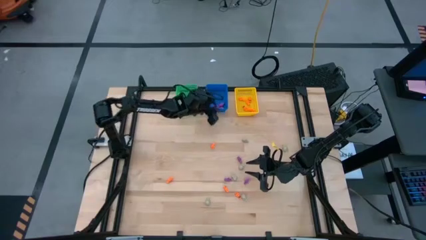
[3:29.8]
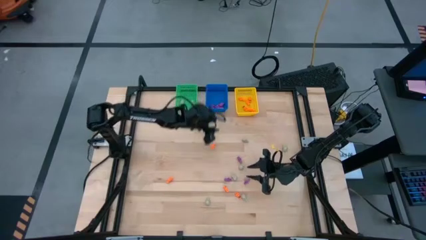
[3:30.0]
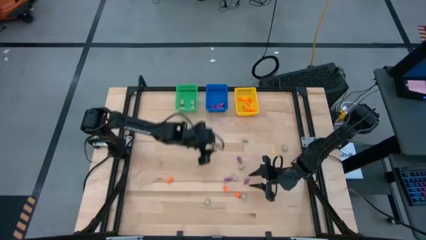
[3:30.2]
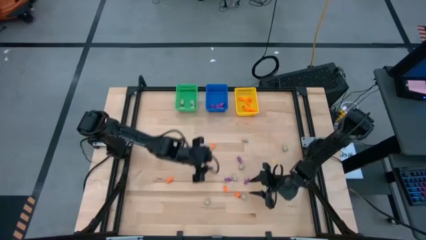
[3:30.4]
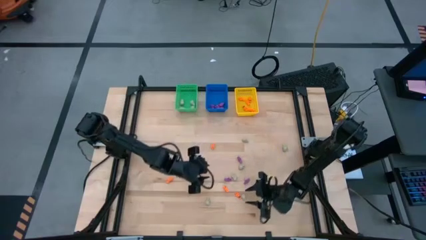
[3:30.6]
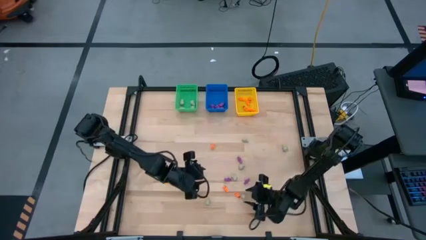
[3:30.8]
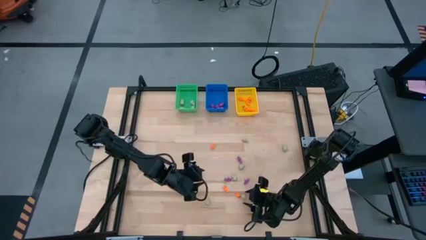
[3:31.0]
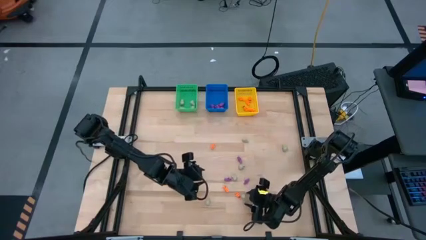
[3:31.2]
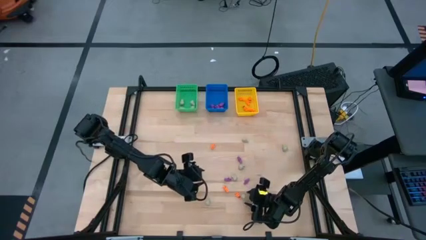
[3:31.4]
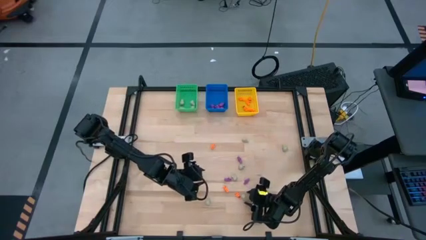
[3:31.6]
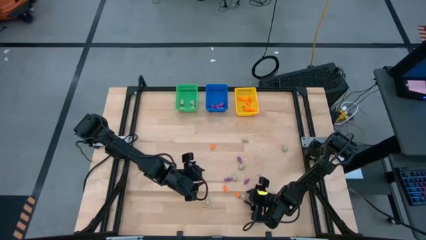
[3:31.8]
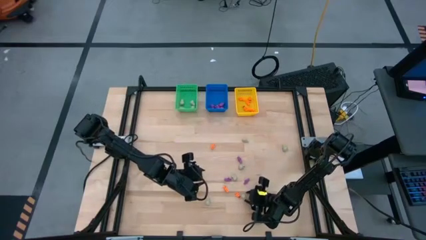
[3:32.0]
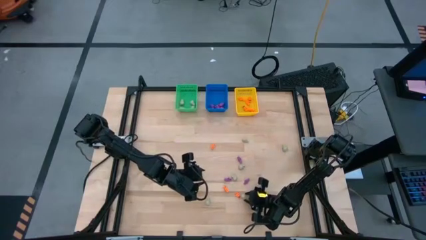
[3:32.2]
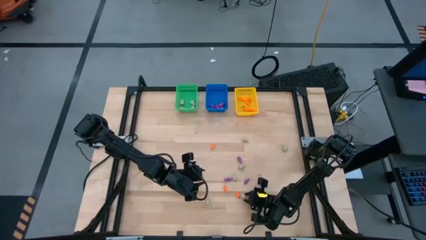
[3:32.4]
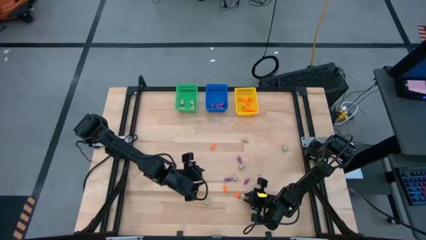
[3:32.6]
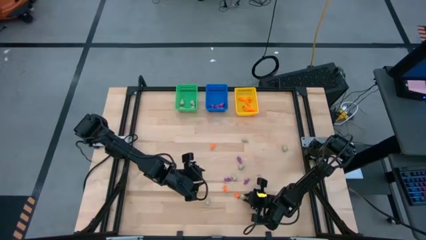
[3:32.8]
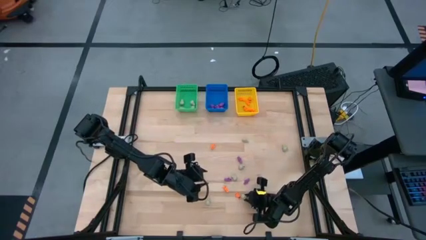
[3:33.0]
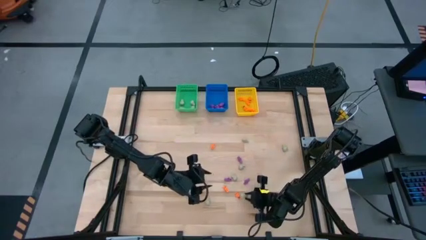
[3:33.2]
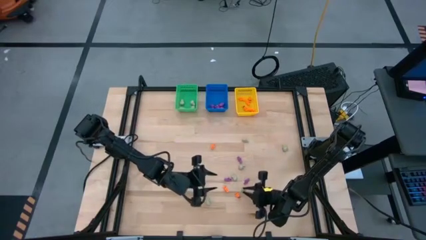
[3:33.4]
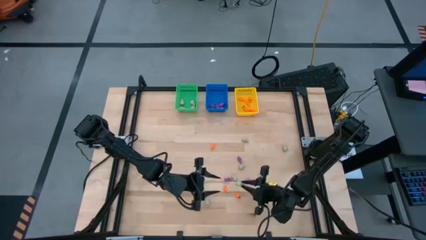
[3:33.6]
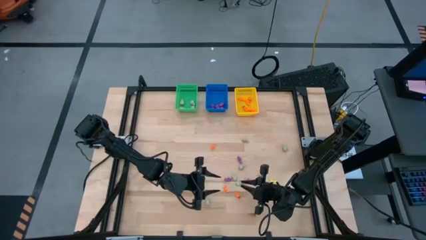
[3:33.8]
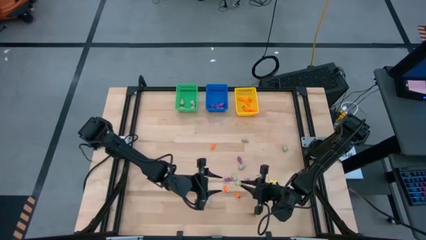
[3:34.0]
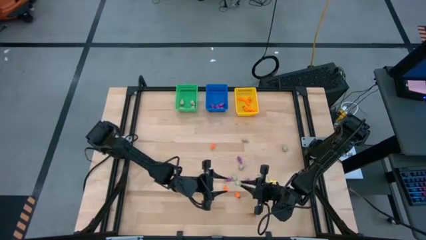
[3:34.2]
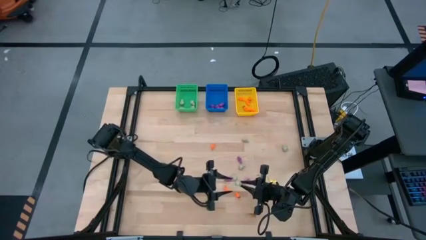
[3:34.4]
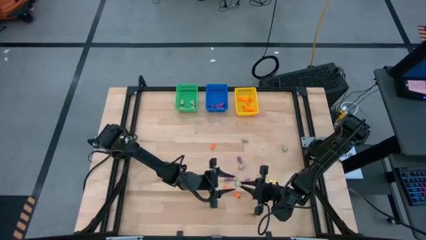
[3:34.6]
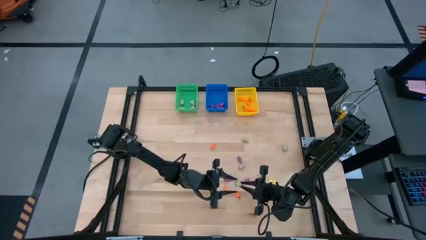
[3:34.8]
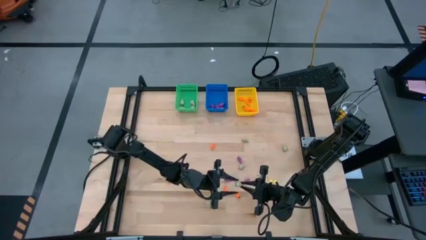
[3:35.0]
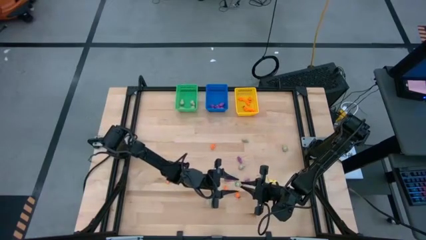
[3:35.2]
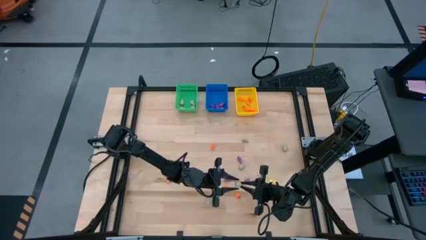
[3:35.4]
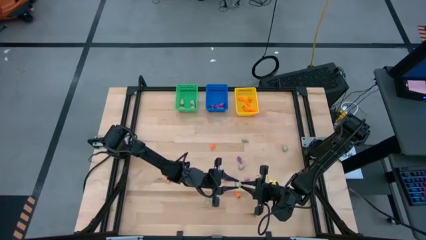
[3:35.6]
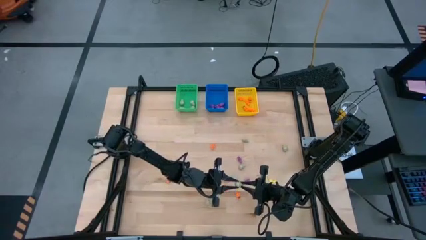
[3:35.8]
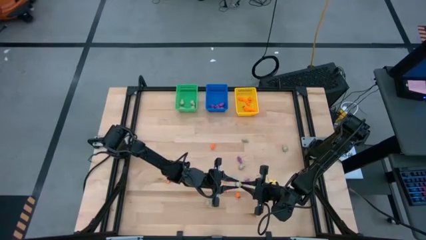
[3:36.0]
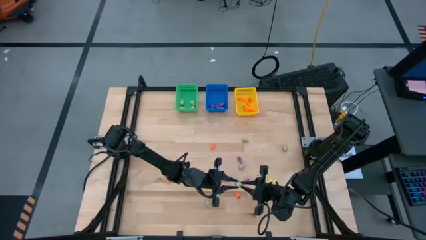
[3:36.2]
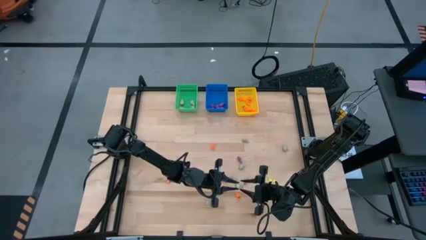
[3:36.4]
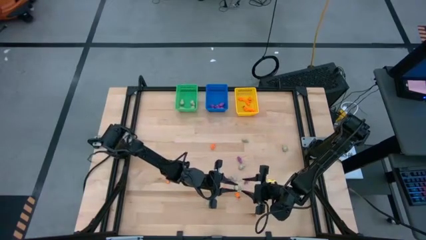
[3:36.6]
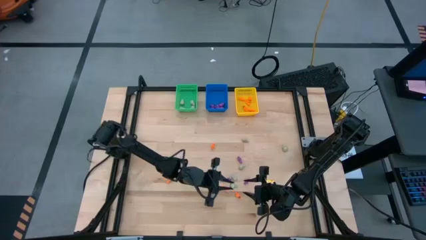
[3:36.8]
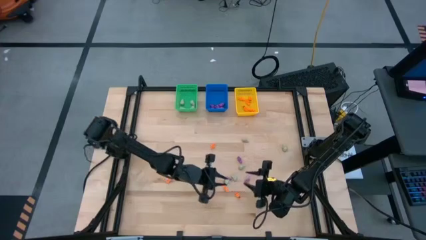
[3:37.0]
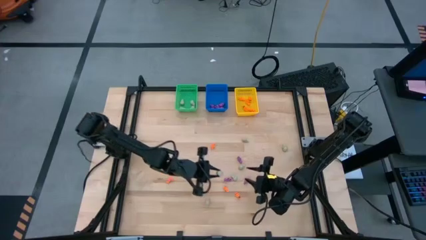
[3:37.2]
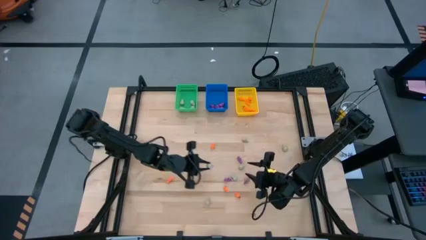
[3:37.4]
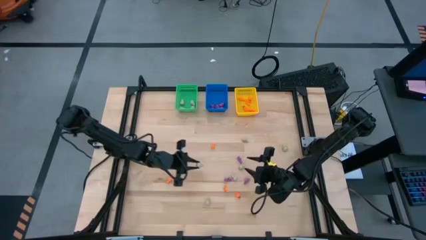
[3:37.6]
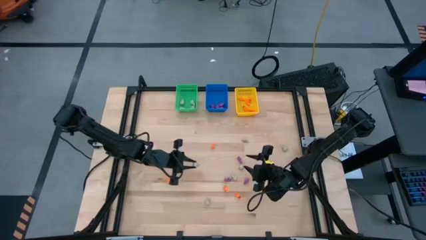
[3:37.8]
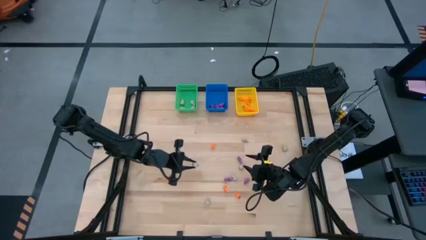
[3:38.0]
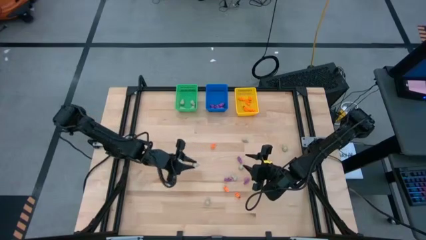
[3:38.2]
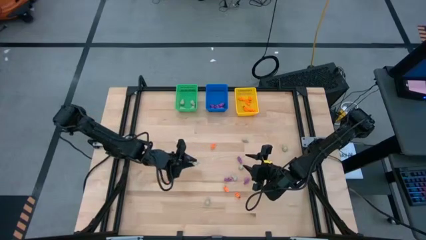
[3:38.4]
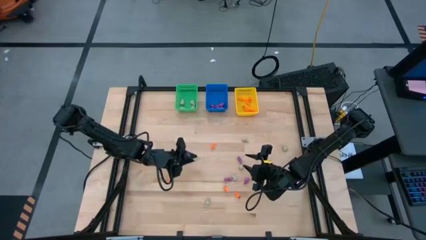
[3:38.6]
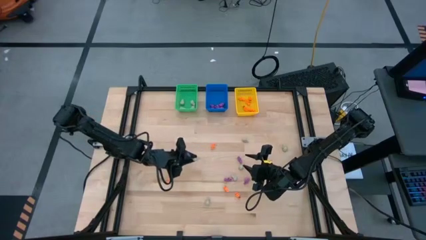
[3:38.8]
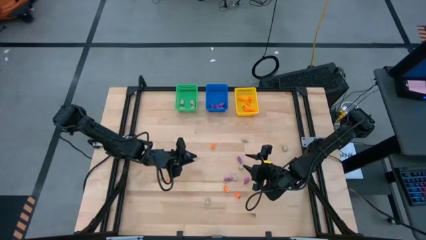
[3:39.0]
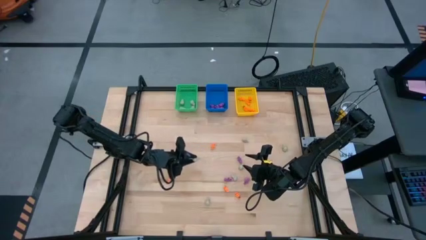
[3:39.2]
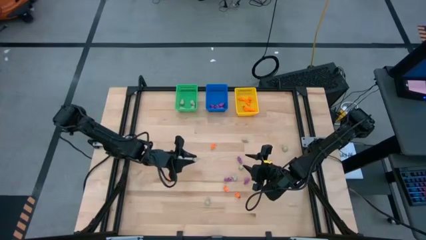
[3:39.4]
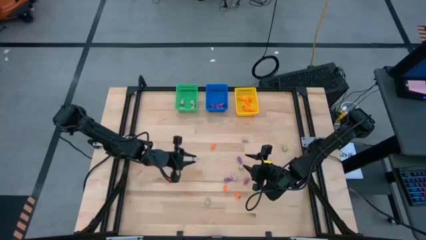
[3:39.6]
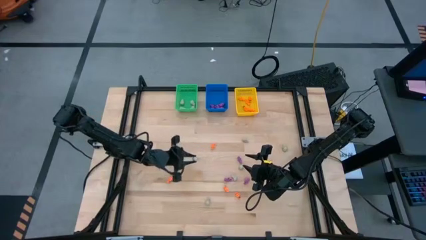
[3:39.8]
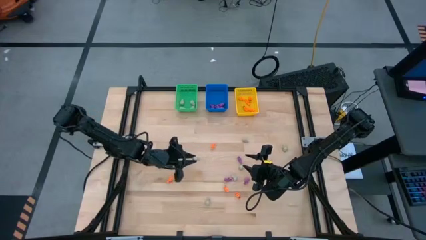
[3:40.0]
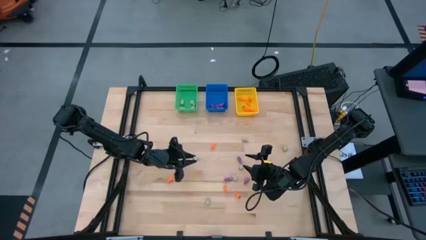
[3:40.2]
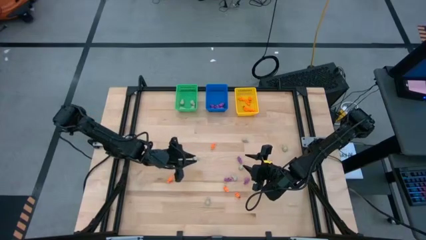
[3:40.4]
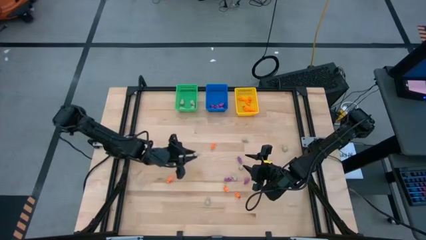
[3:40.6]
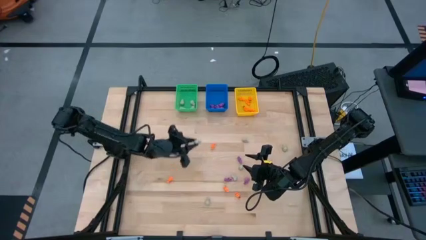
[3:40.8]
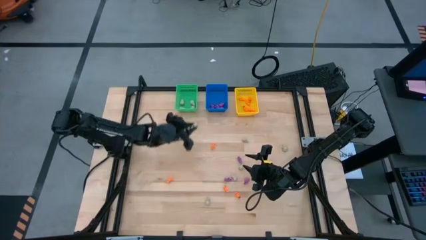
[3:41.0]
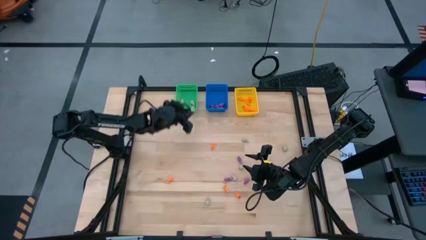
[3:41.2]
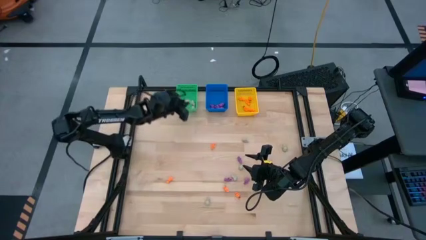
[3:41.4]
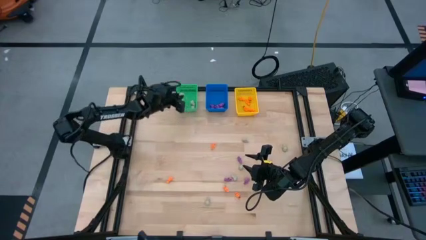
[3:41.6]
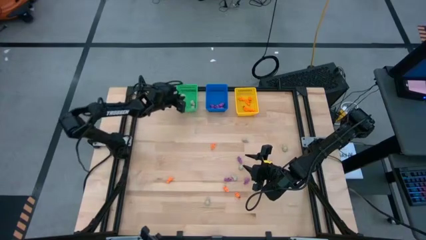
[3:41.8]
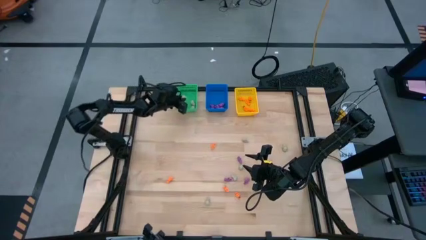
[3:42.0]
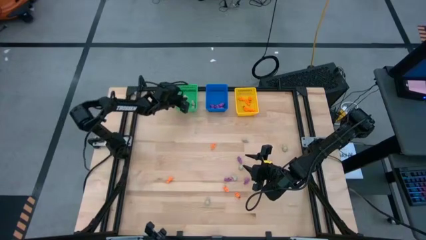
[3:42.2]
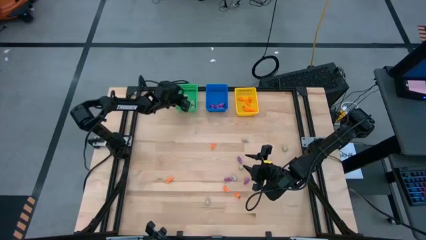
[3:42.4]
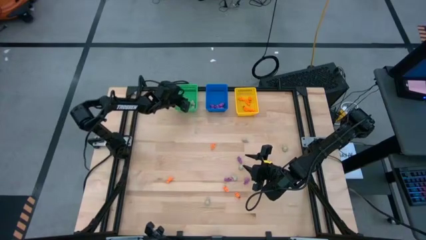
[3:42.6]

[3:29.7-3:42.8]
Task: Sort Halloween decoration
Put the gray skull toy into the green bin

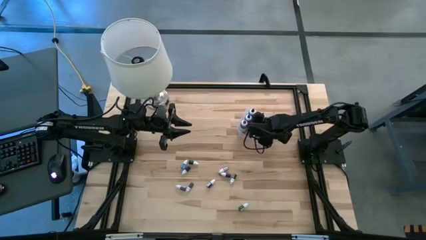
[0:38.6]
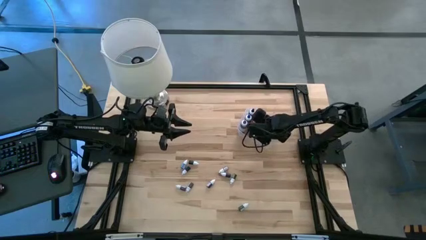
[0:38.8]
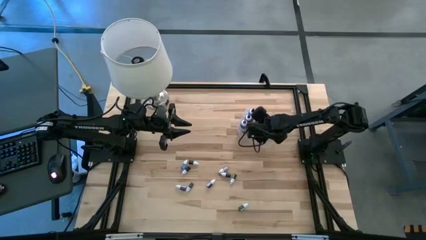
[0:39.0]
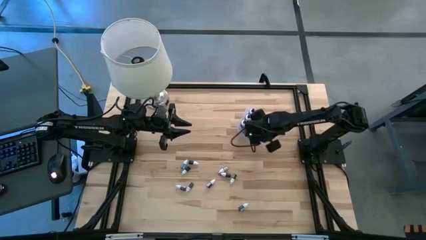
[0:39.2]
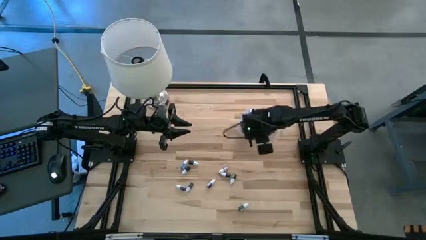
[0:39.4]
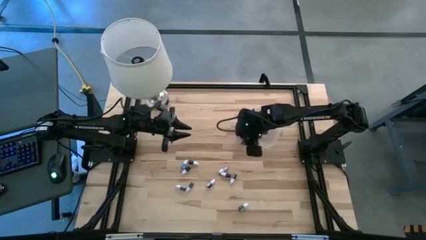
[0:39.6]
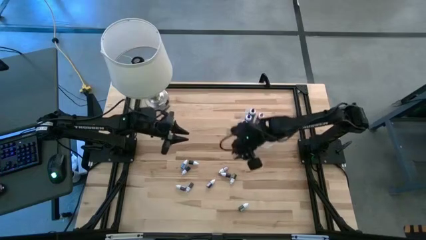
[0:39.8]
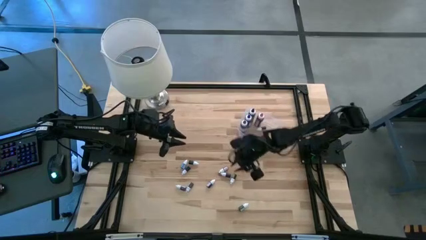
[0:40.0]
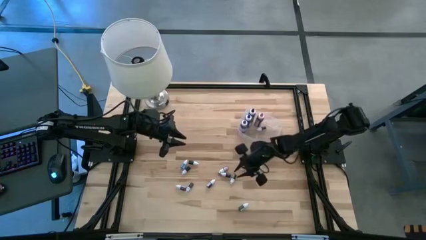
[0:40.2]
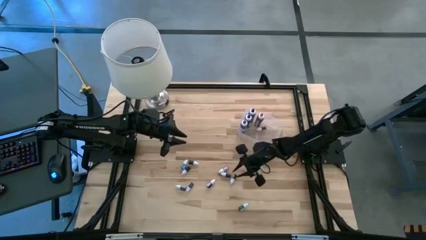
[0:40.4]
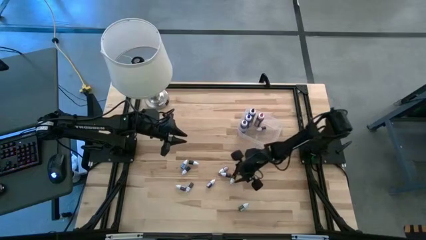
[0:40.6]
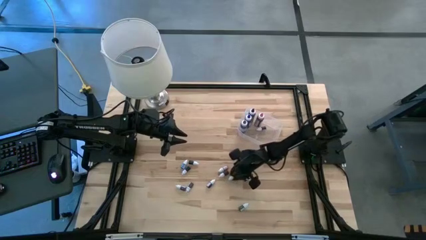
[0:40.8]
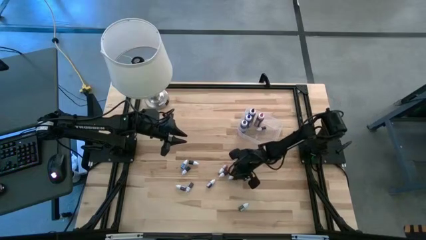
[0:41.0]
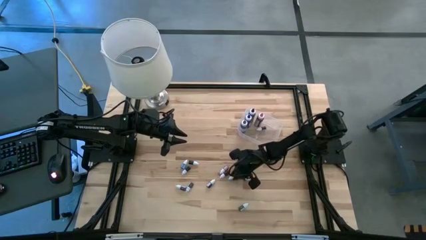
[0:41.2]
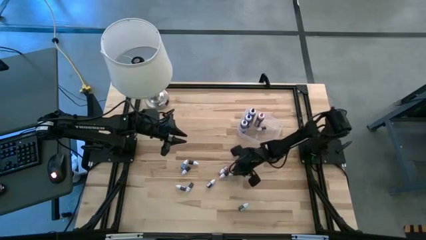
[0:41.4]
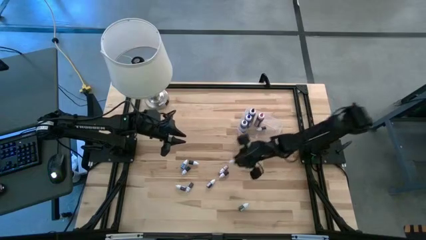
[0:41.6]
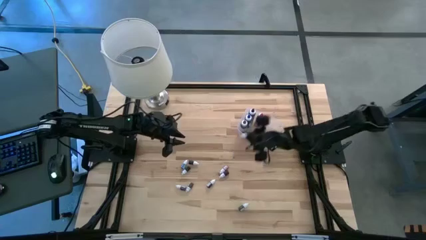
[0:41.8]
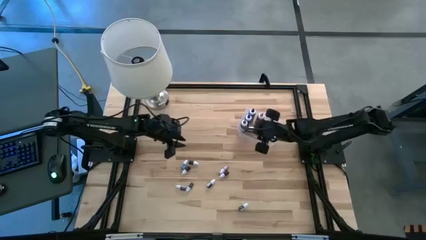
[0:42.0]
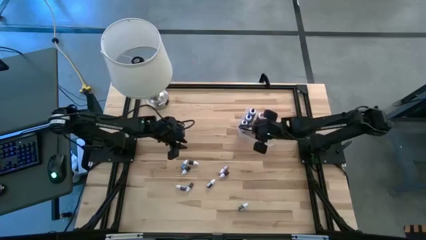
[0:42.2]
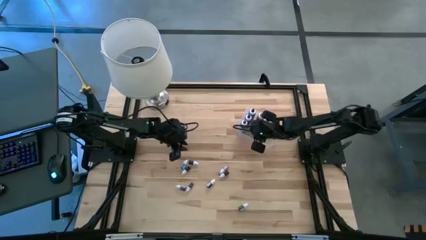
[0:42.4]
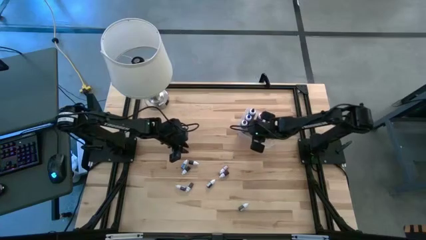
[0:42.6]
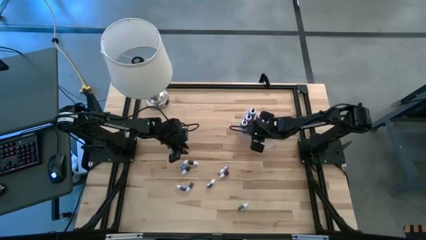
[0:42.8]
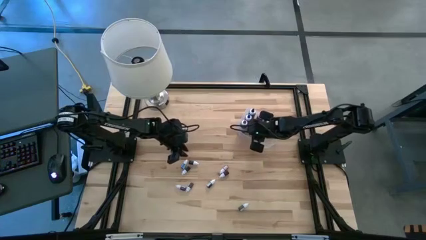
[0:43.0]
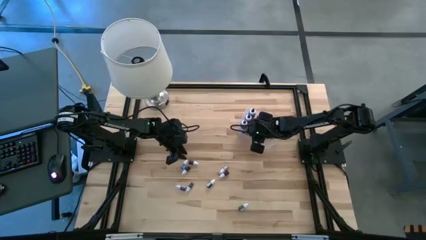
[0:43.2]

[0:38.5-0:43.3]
Task: Pick & Place food coloring
Put the top right small green food coloring bottle into the transparent bin
